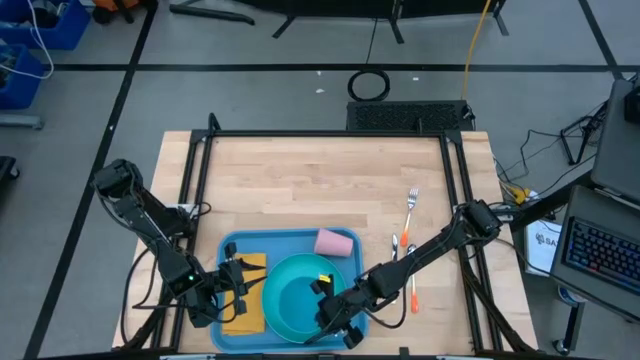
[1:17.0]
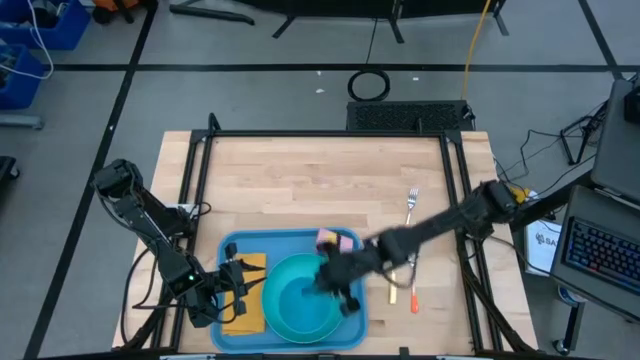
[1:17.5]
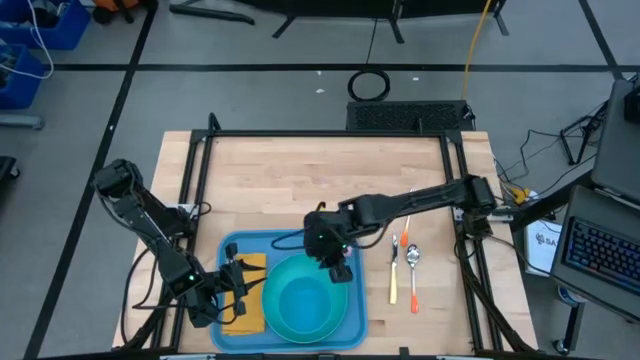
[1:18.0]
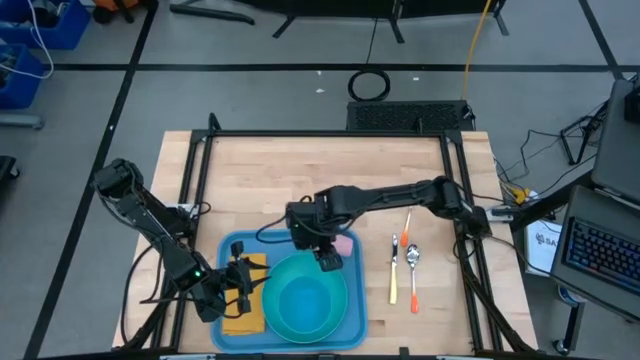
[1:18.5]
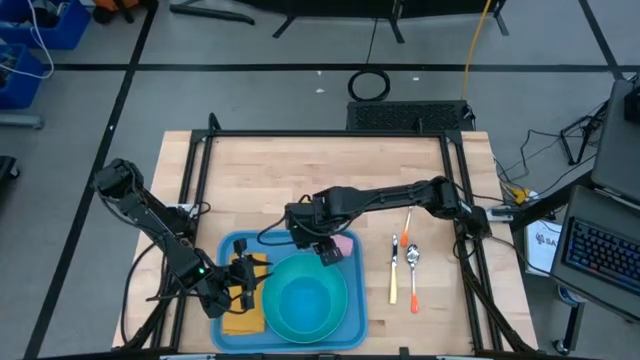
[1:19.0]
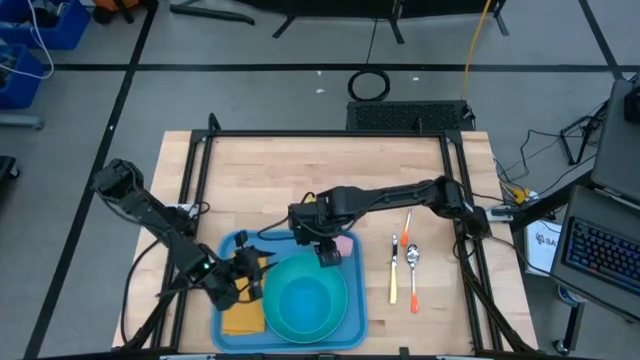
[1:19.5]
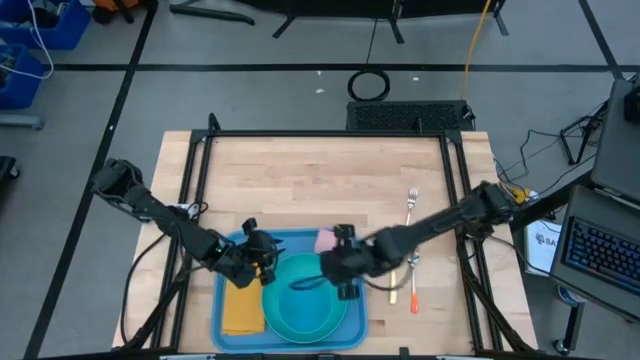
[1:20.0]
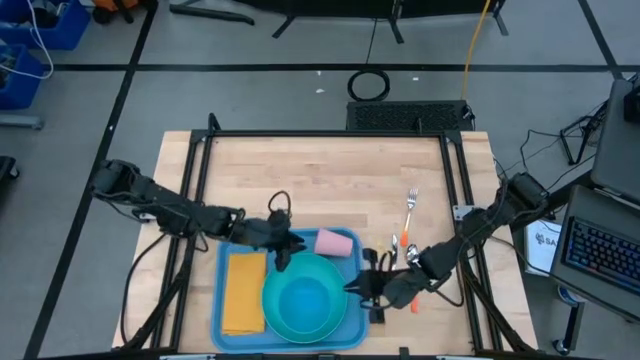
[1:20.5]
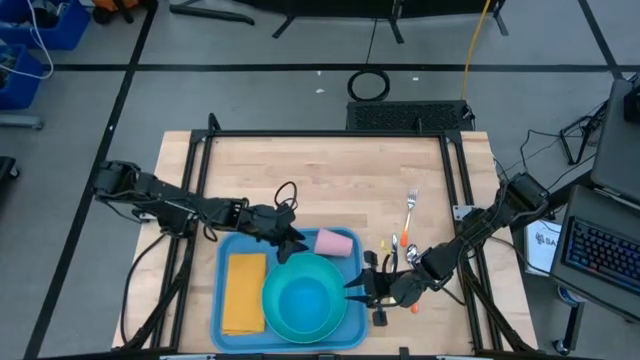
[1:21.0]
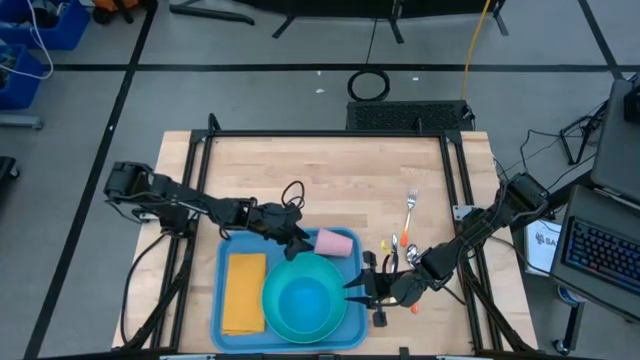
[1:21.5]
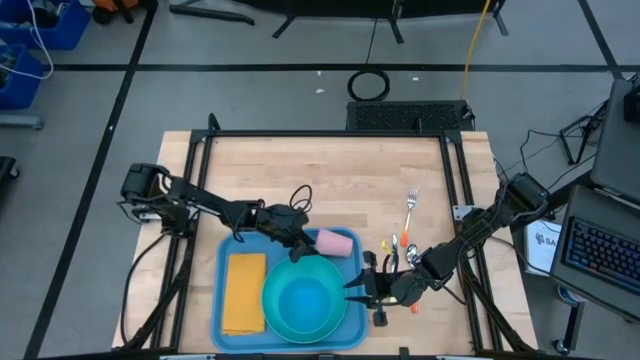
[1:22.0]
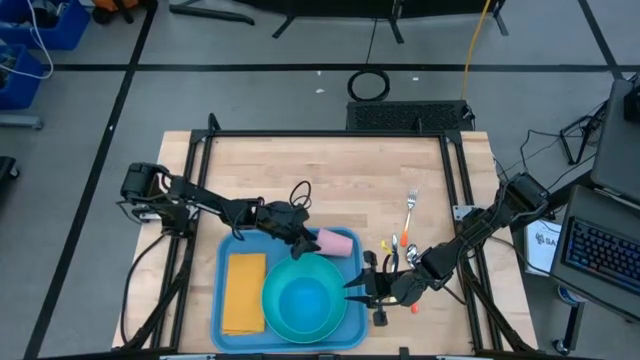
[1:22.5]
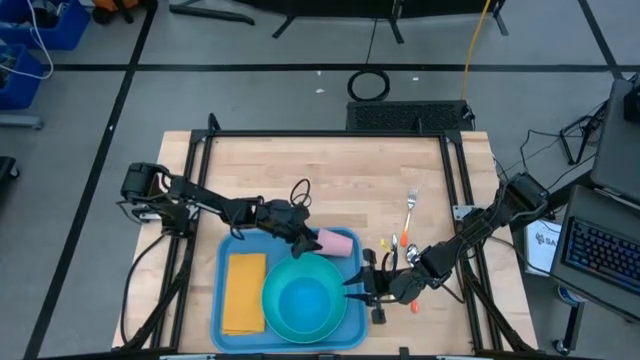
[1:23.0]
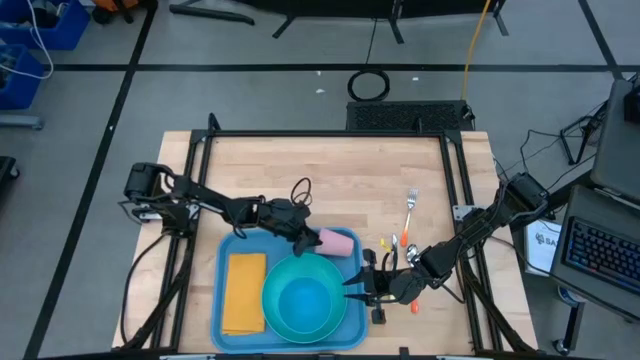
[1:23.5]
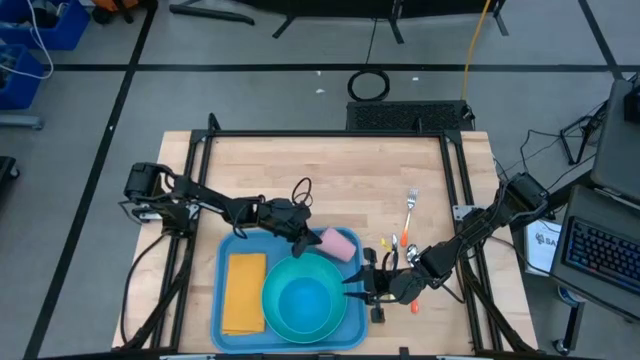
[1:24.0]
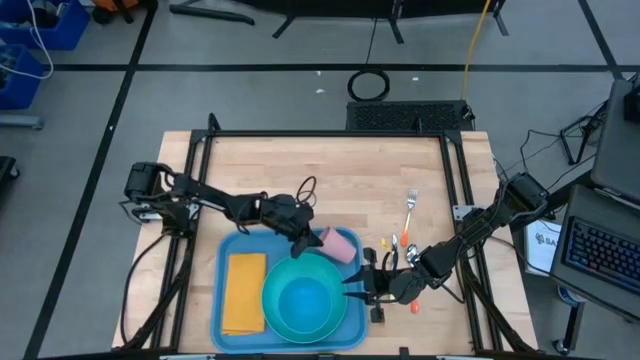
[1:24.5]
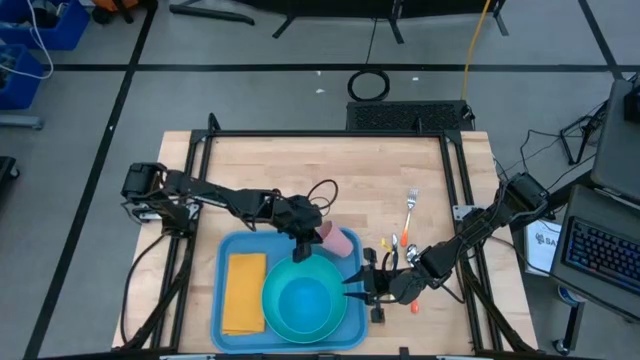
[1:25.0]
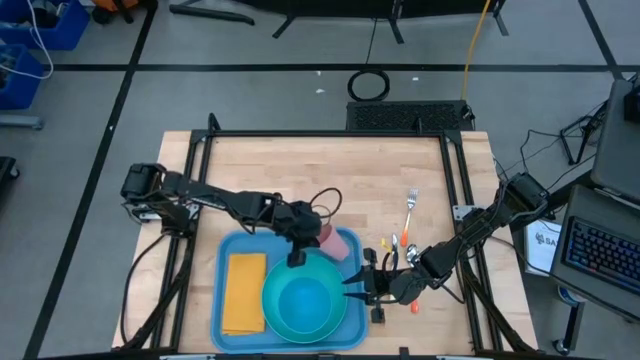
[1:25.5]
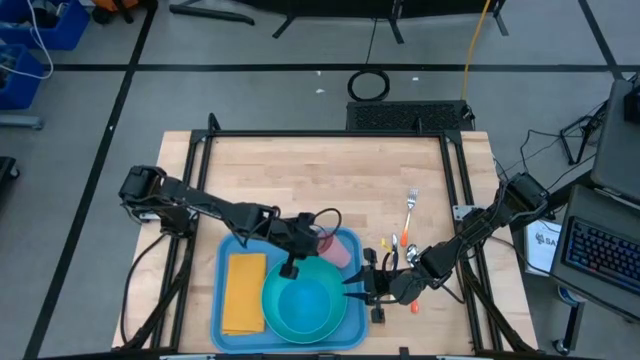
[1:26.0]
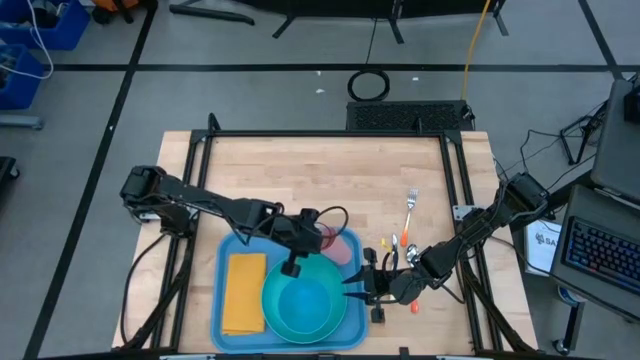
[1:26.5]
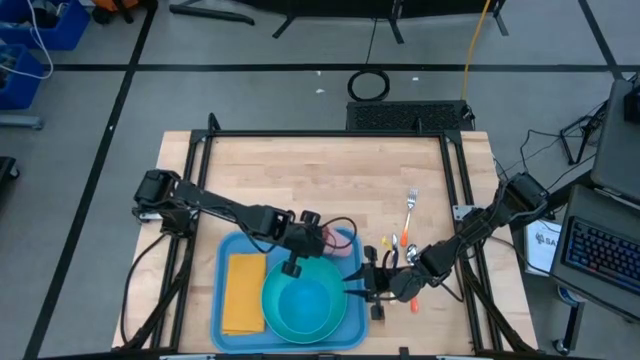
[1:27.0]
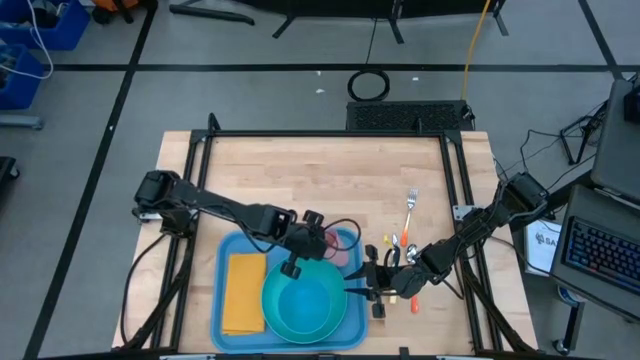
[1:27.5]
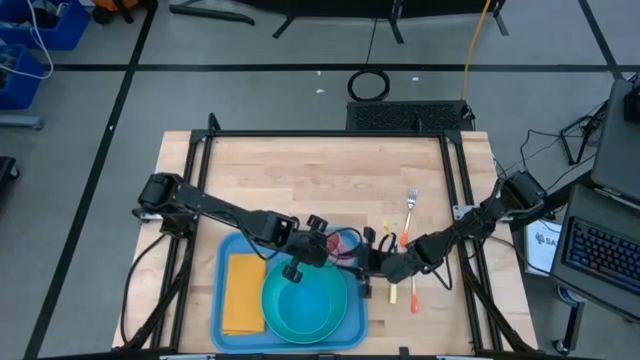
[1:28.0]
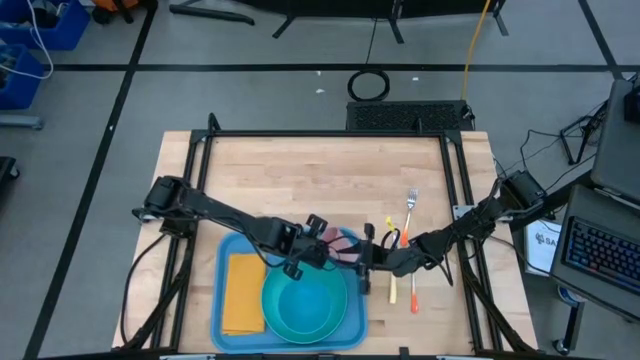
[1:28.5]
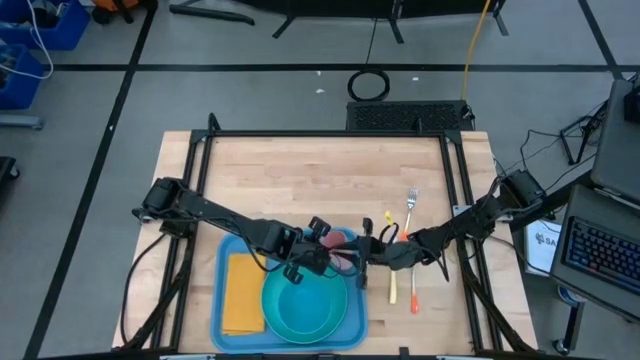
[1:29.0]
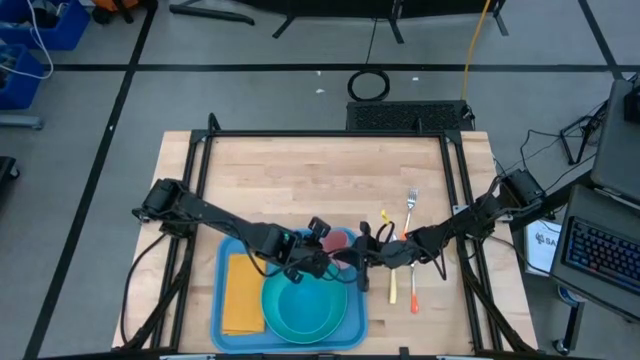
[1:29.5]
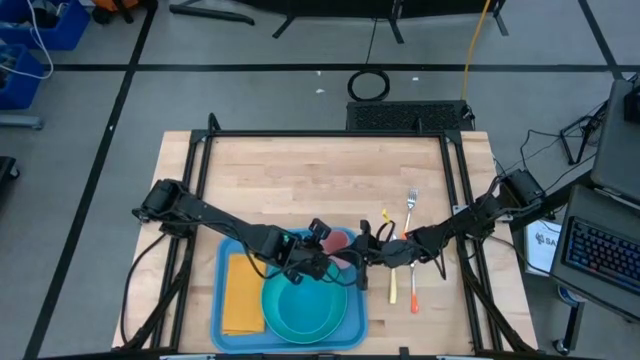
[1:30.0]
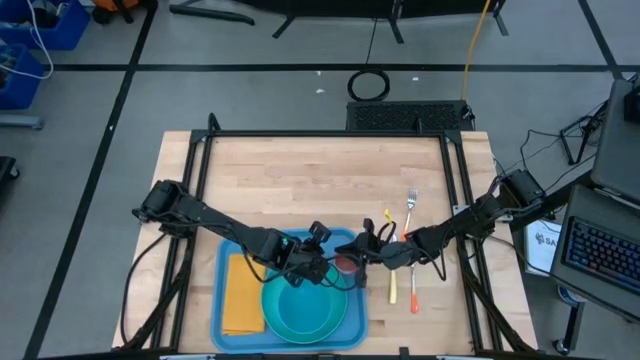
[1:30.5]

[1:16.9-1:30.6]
Task: Set up tray
Adjust the pink cup on the blue tray
